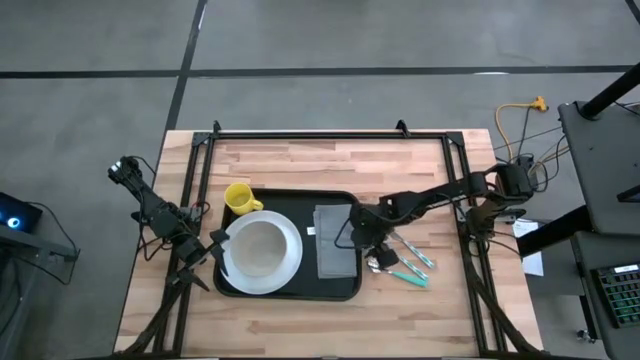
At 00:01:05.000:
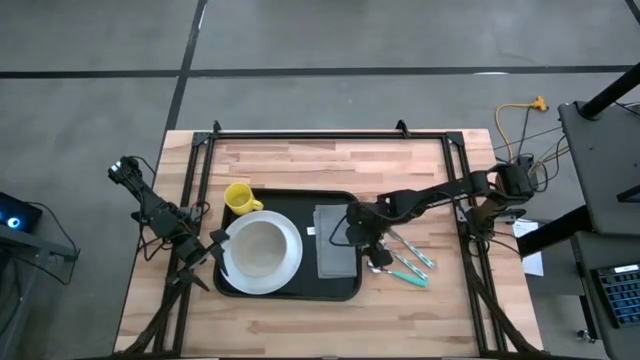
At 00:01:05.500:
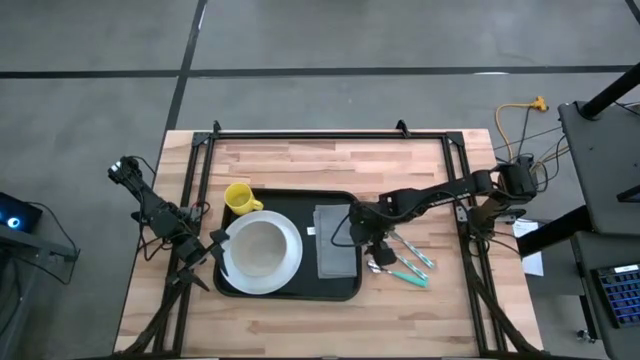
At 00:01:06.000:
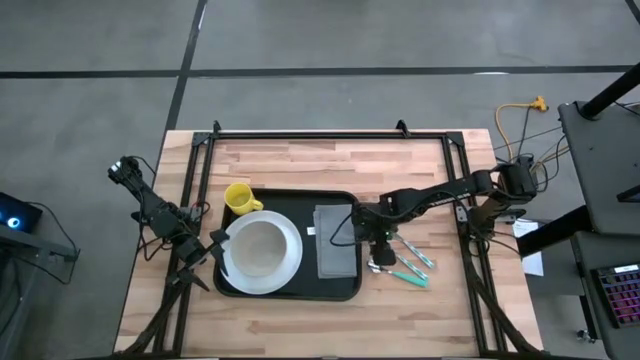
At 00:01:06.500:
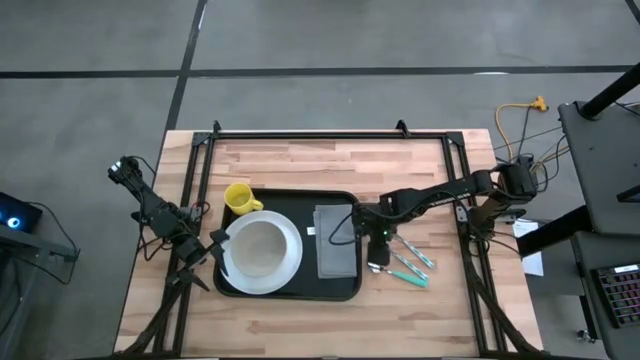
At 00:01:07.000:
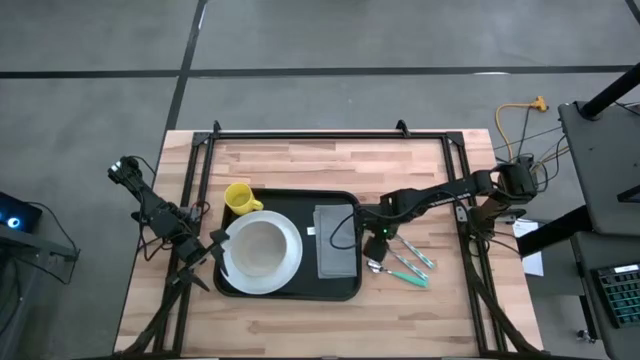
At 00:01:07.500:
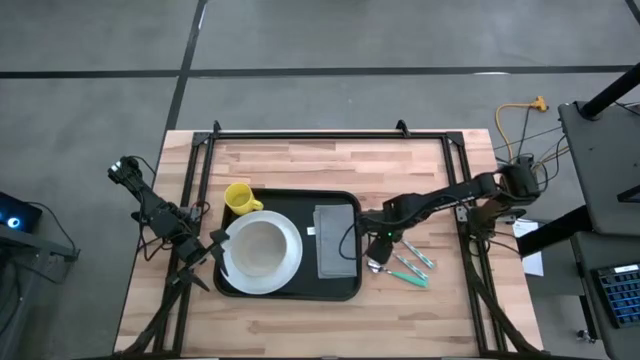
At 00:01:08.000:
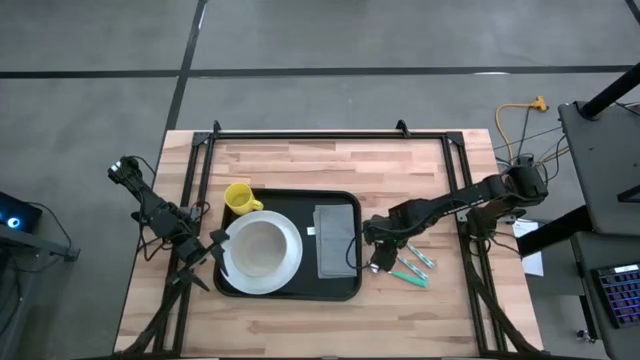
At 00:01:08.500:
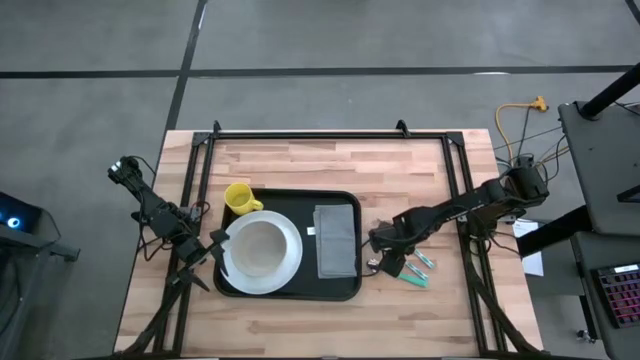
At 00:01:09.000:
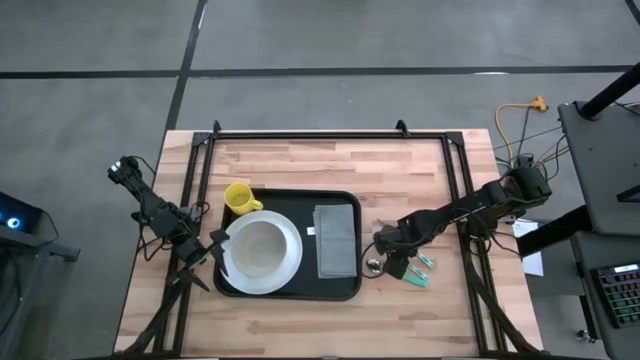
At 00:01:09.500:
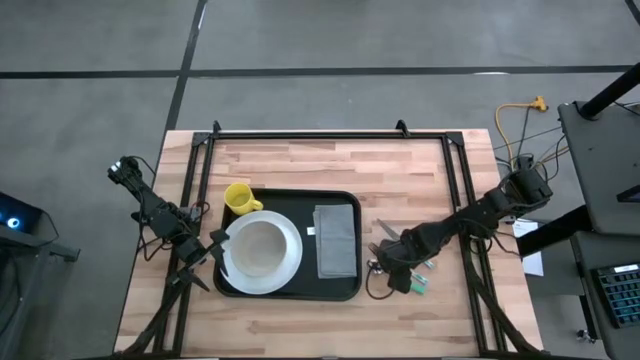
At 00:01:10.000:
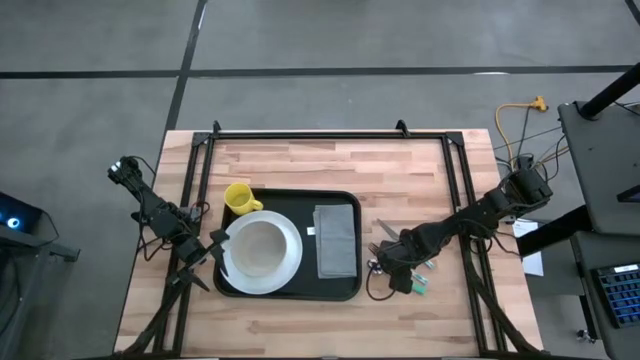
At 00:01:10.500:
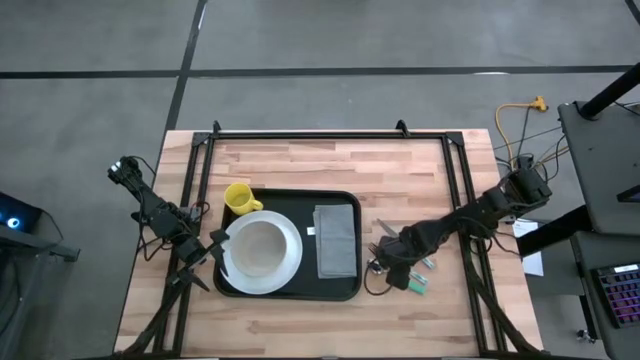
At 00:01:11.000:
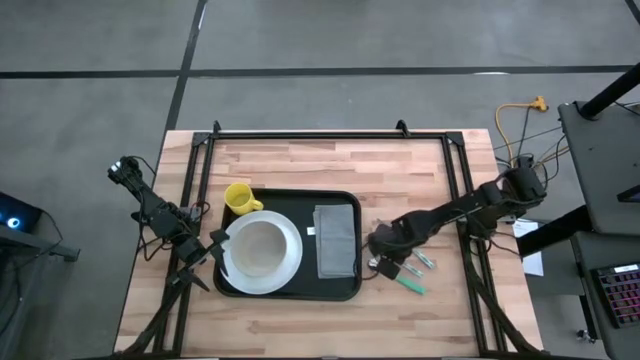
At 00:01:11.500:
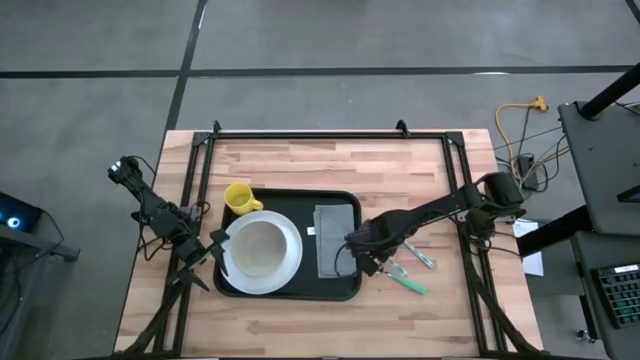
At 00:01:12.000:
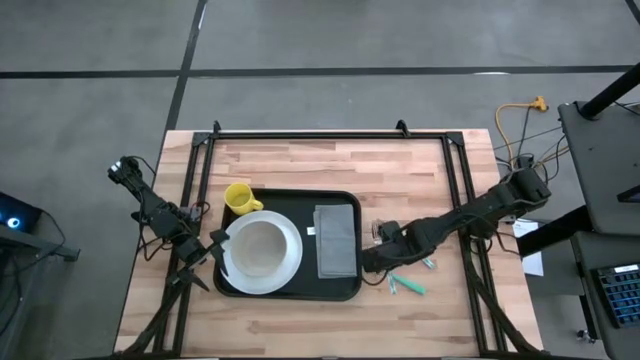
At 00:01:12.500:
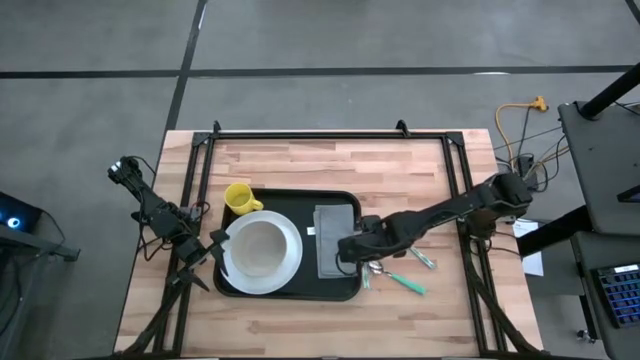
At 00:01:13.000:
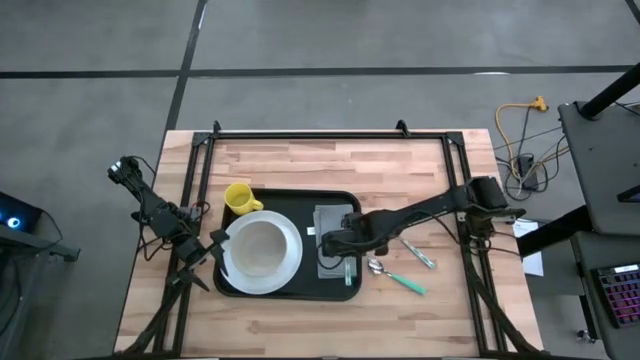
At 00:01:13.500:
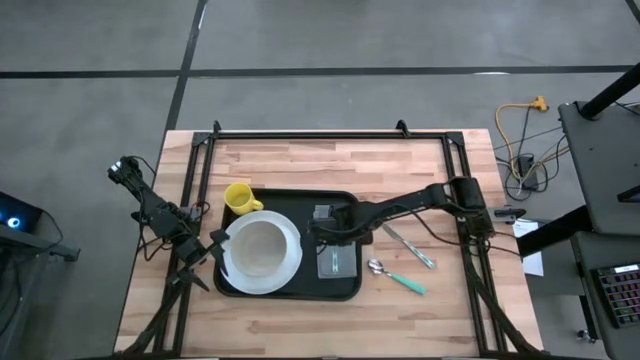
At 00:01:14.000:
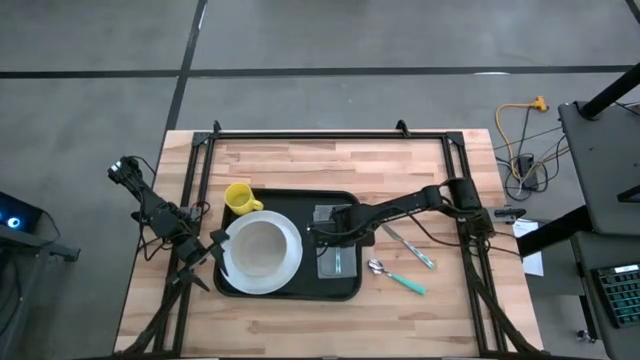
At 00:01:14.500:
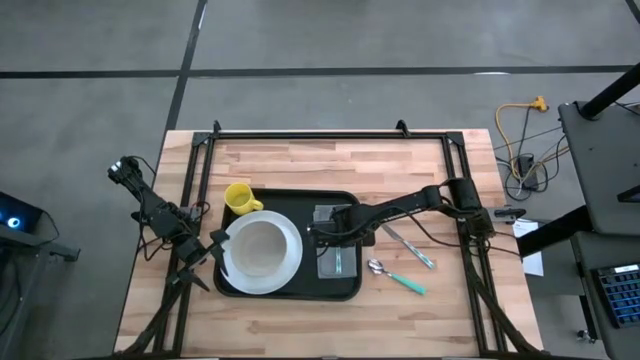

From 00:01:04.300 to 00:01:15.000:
Task: Set up tray
Put the white and blue fork on the gray napkin

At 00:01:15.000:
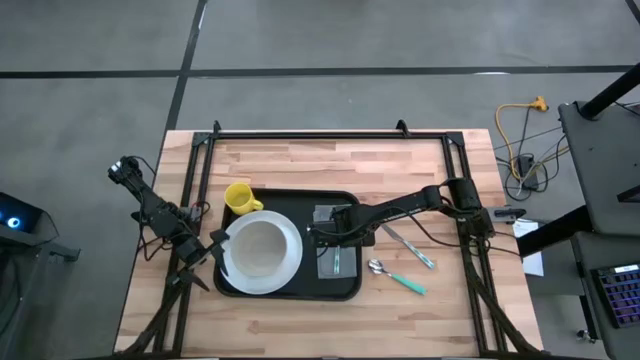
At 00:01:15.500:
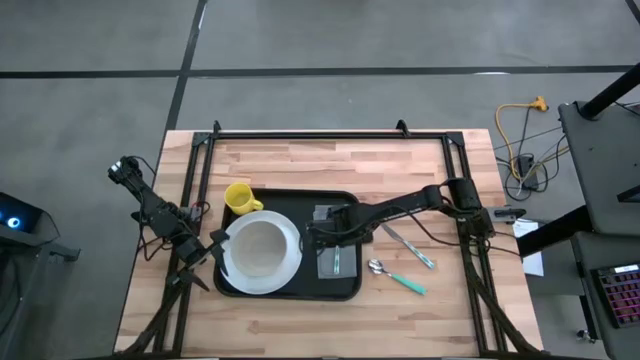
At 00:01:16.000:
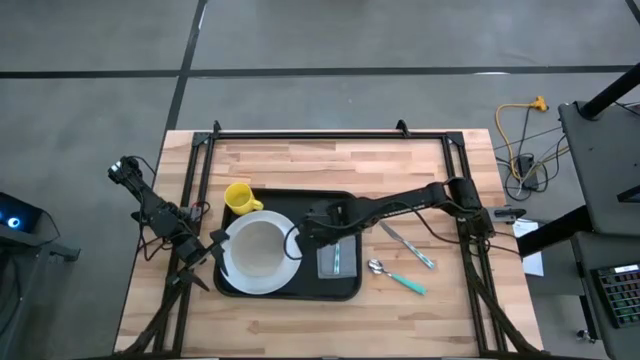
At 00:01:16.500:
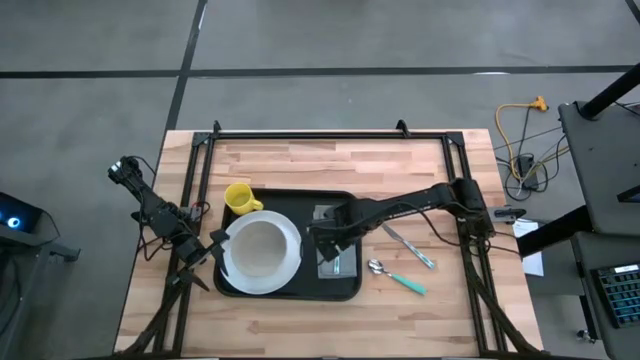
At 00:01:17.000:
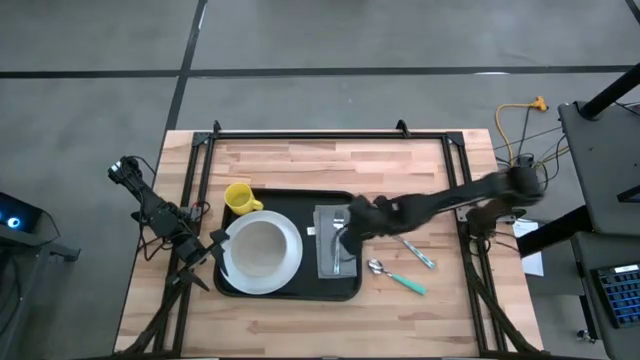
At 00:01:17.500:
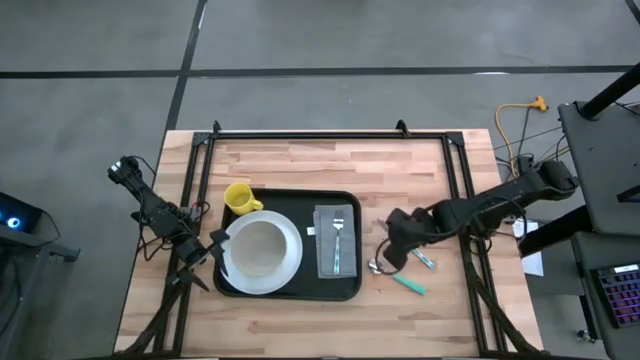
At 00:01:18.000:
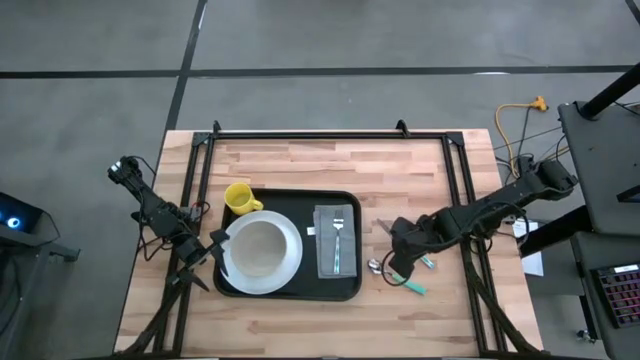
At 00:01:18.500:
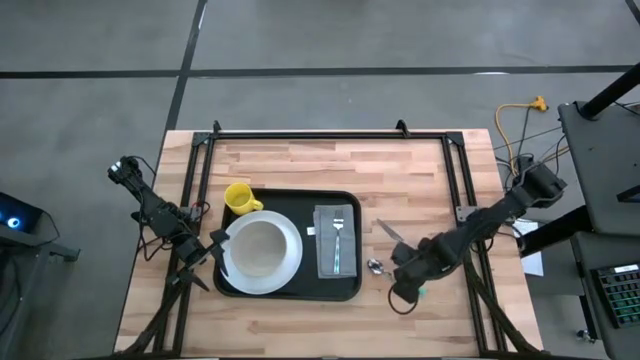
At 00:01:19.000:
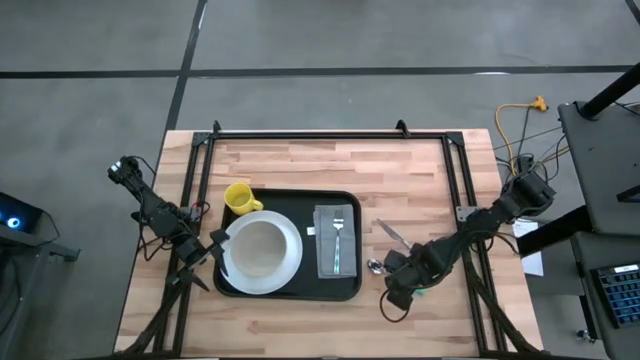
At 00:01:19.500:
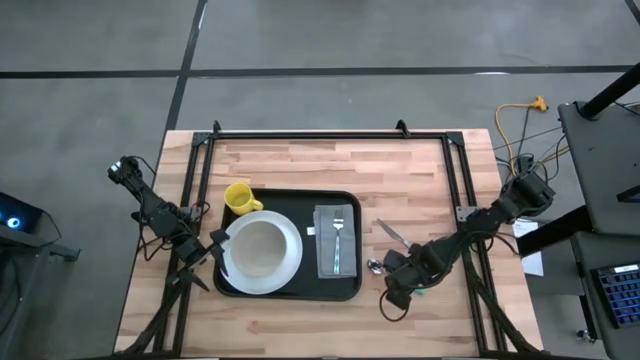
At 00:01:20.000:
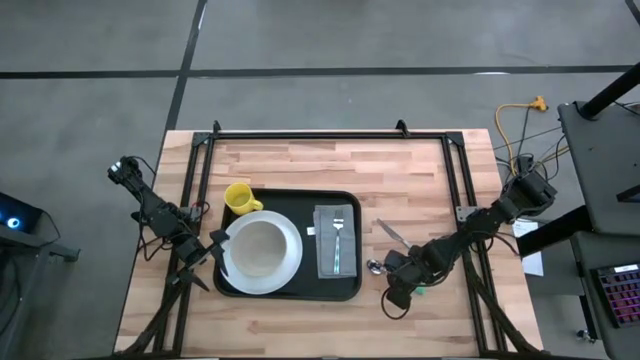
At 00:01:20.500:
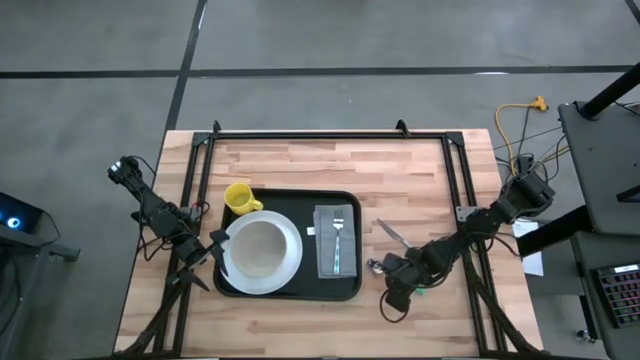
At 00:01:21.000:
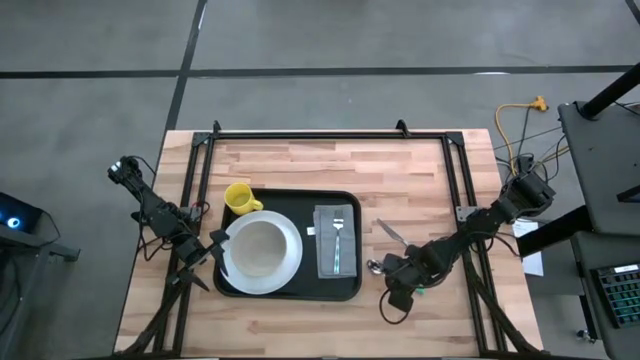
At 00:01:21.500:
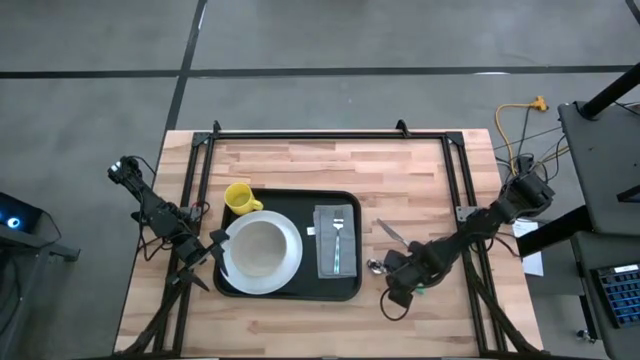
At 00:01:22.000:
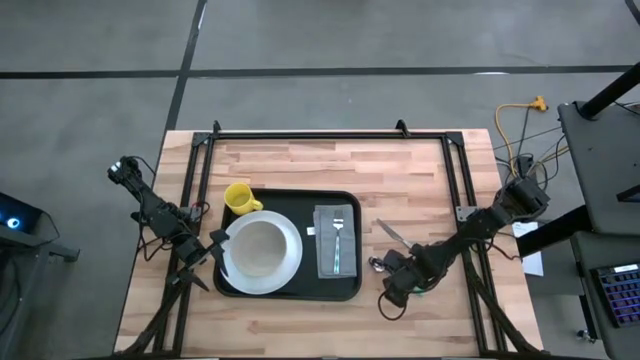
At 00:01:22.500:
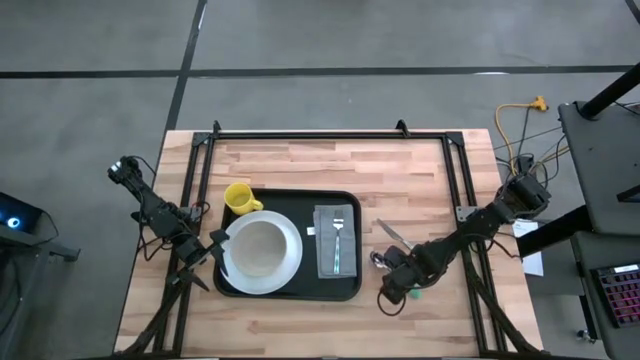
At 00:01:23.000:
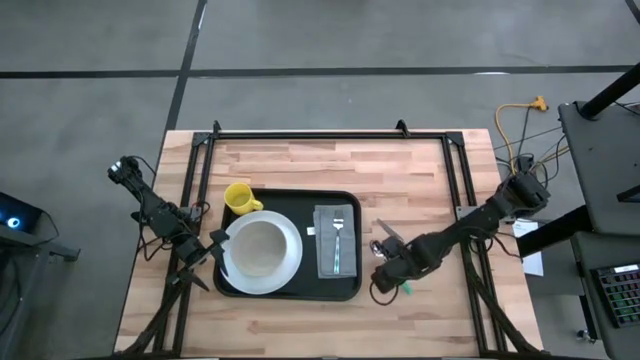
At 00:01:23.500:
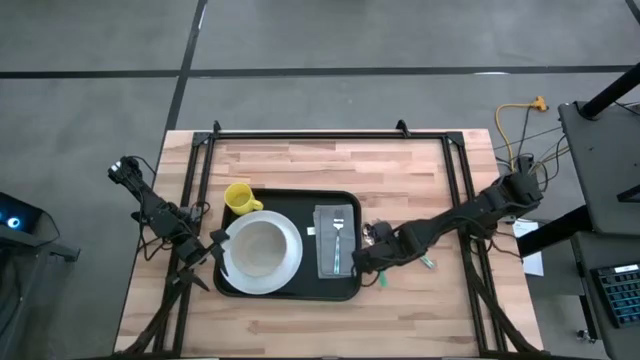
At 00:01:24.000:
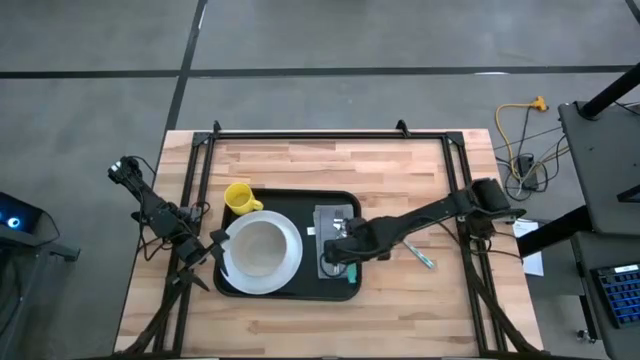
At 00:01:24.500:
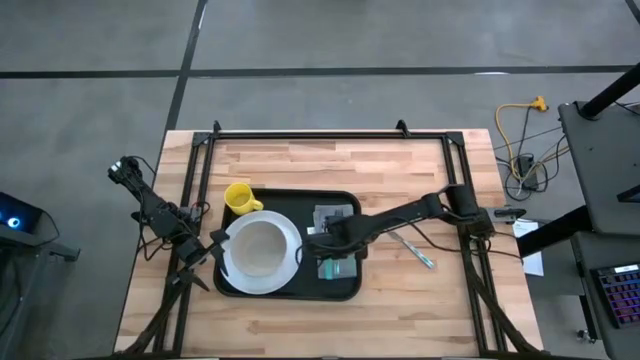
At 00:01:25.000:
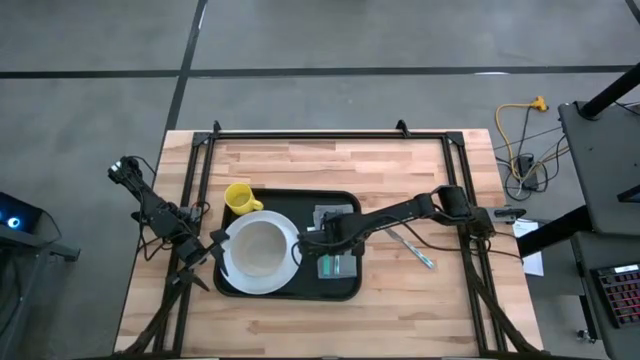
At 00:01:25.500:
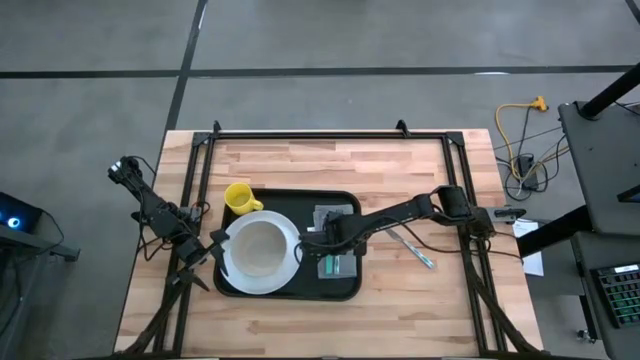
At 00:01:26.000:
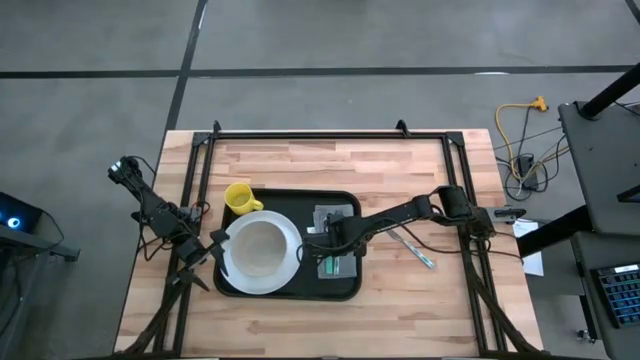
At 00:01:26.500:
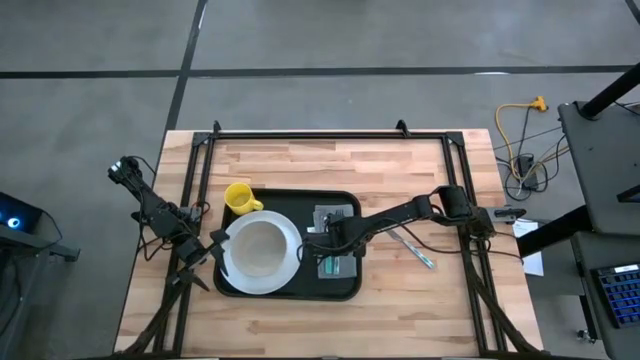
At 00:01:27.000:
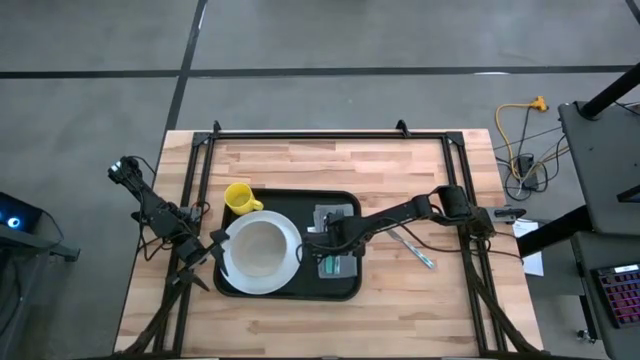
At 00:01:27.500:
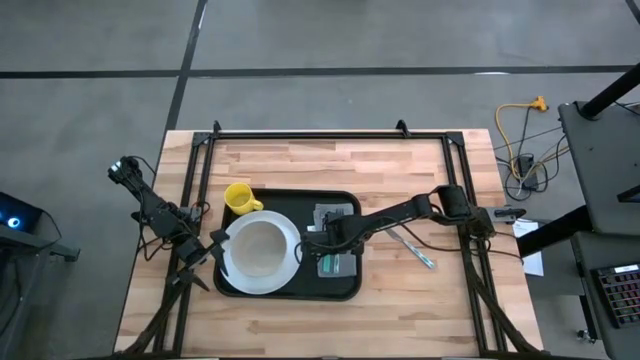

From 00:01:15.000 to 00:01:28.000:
Put the green spoon on the gray napkin to the left of the white and blue fork
